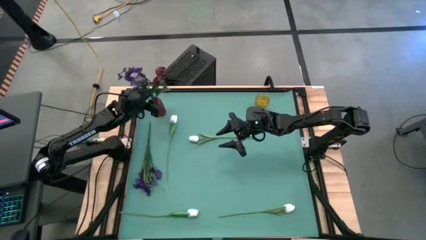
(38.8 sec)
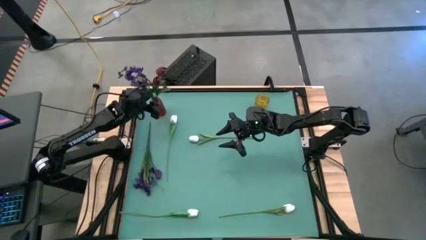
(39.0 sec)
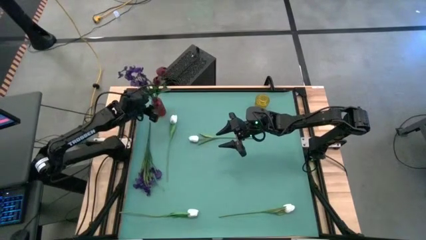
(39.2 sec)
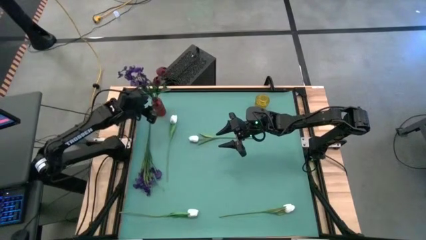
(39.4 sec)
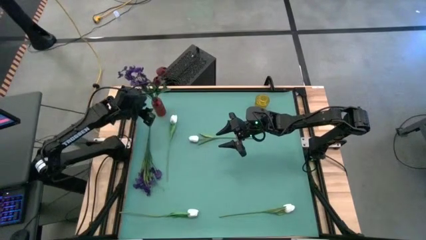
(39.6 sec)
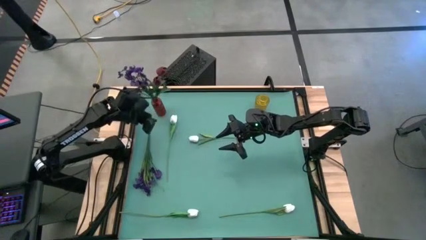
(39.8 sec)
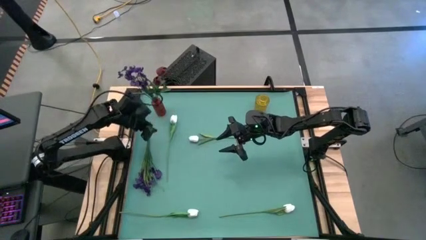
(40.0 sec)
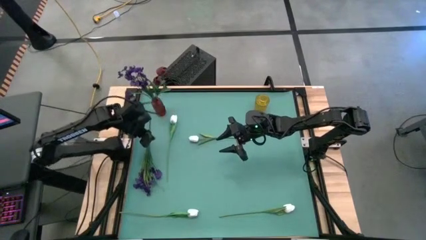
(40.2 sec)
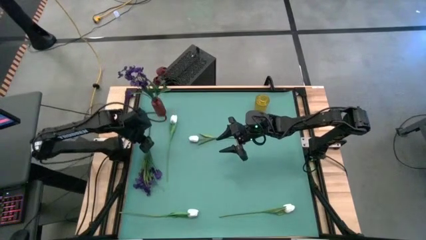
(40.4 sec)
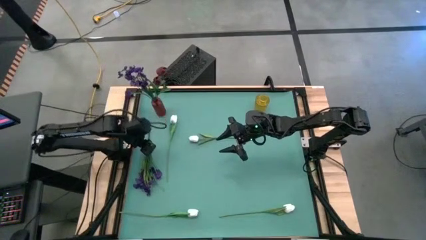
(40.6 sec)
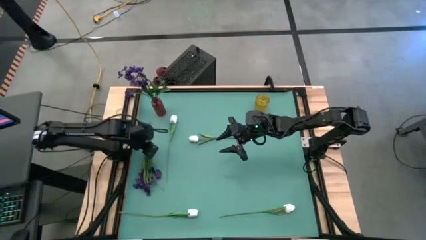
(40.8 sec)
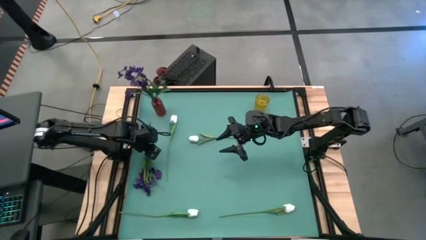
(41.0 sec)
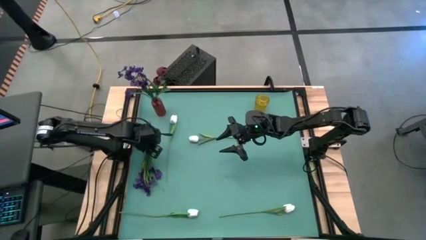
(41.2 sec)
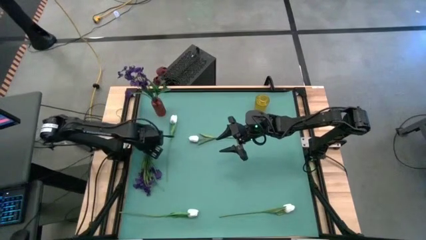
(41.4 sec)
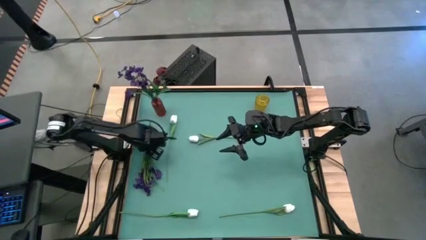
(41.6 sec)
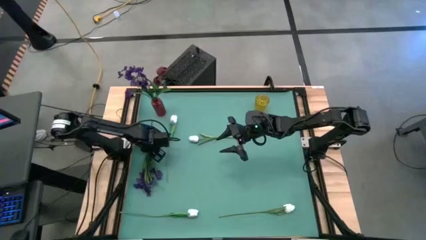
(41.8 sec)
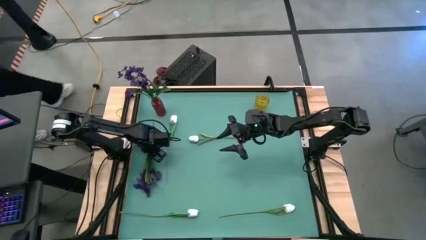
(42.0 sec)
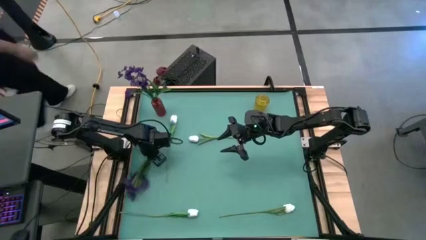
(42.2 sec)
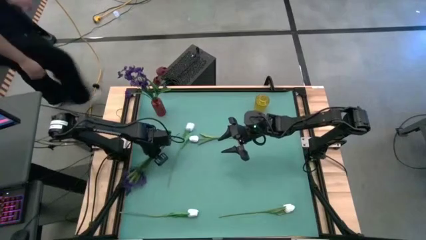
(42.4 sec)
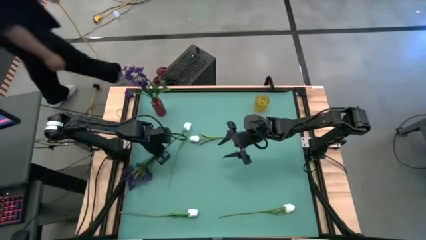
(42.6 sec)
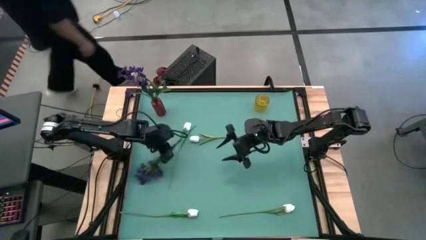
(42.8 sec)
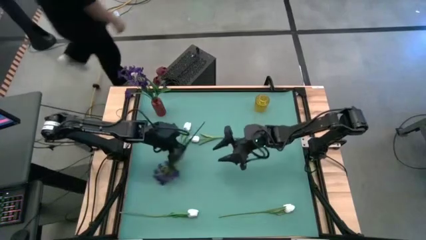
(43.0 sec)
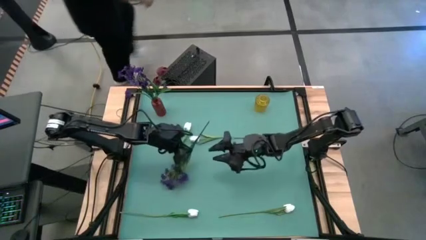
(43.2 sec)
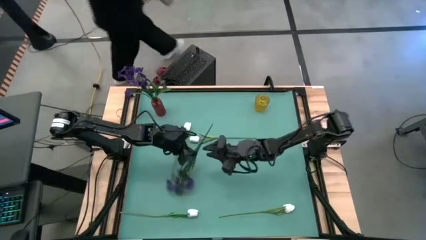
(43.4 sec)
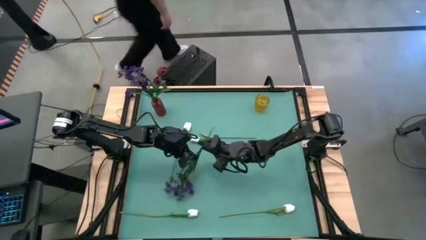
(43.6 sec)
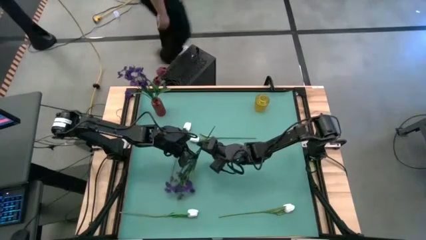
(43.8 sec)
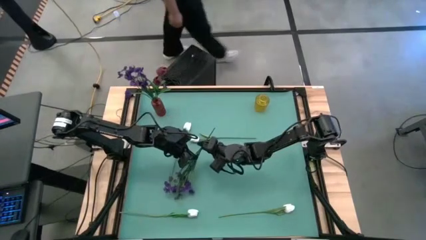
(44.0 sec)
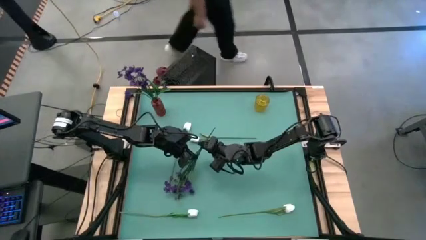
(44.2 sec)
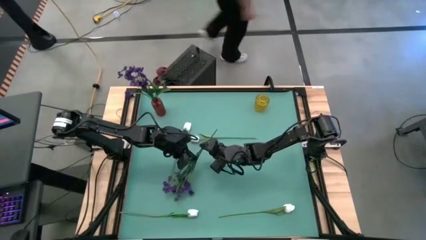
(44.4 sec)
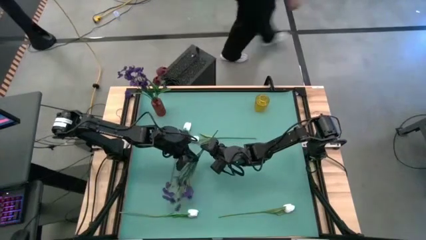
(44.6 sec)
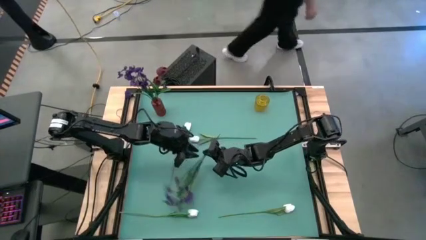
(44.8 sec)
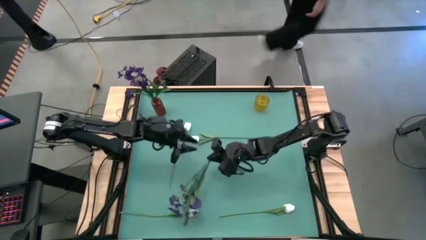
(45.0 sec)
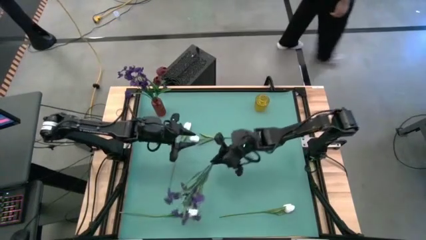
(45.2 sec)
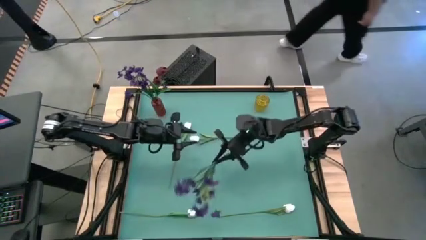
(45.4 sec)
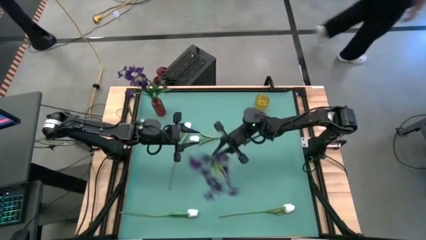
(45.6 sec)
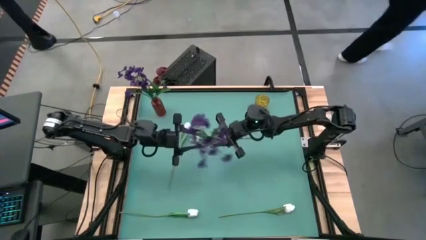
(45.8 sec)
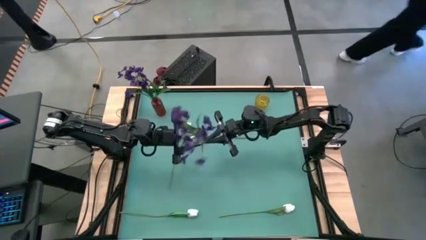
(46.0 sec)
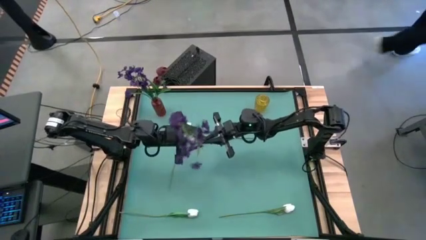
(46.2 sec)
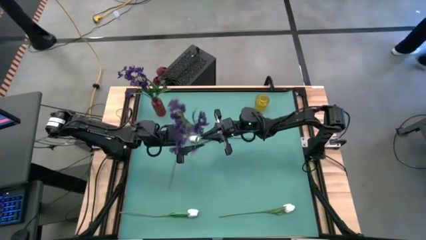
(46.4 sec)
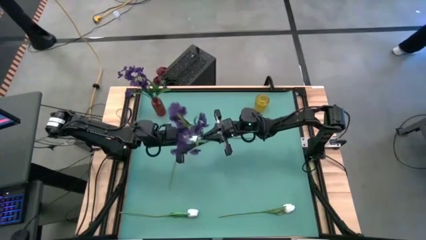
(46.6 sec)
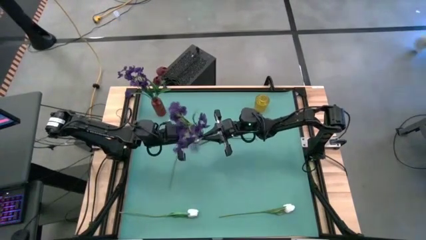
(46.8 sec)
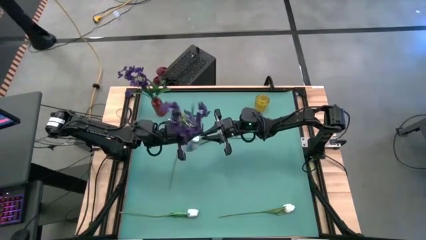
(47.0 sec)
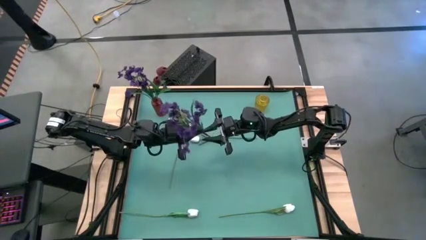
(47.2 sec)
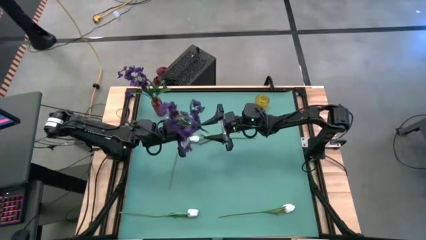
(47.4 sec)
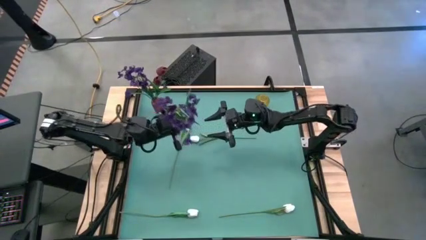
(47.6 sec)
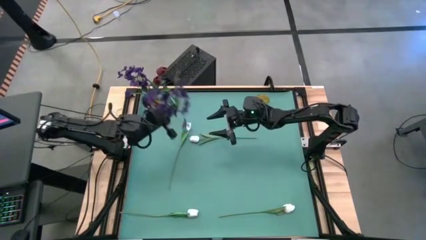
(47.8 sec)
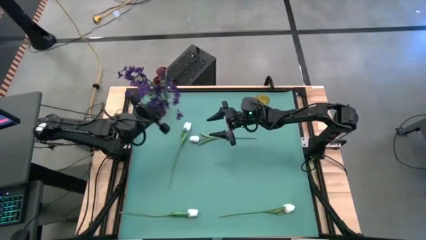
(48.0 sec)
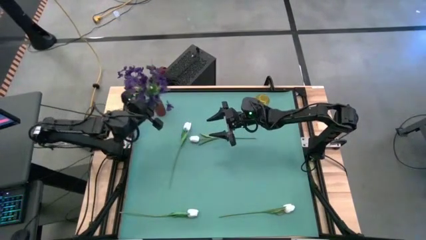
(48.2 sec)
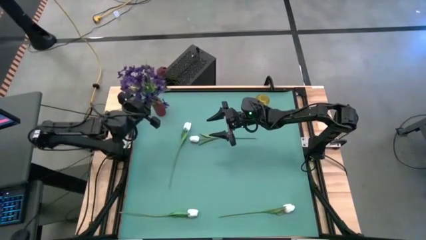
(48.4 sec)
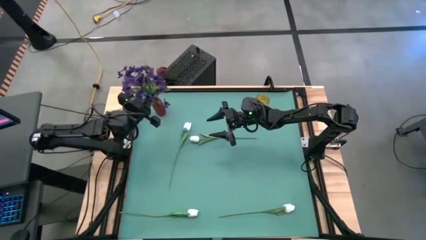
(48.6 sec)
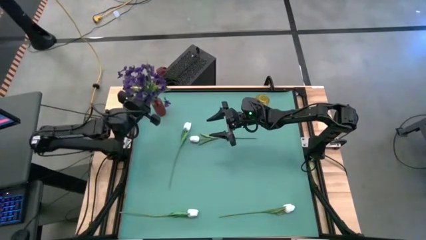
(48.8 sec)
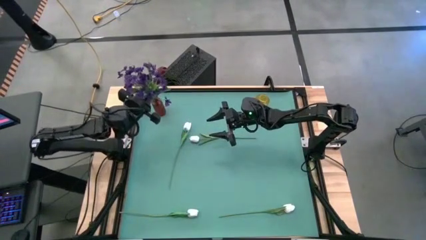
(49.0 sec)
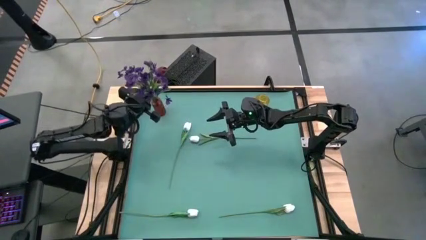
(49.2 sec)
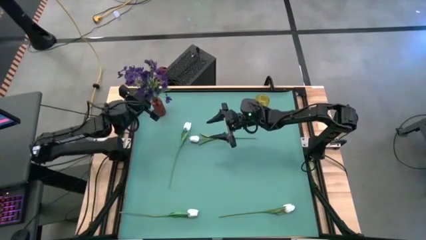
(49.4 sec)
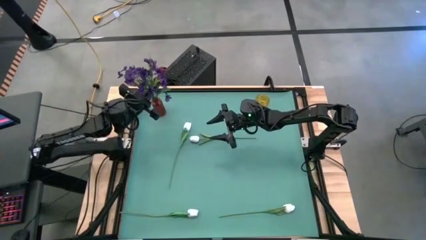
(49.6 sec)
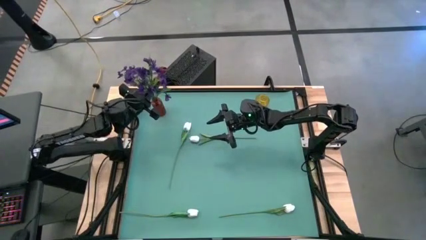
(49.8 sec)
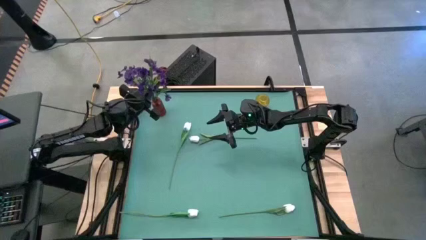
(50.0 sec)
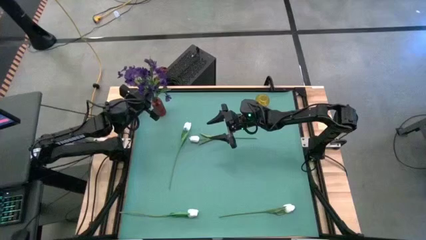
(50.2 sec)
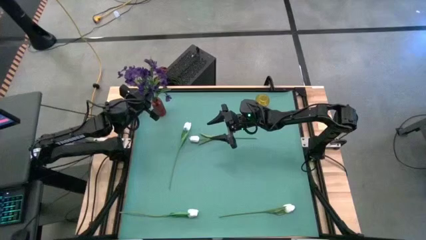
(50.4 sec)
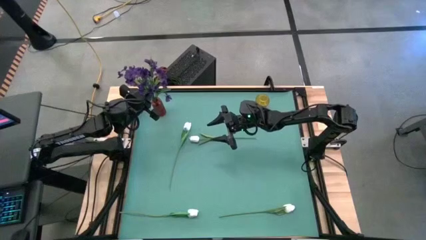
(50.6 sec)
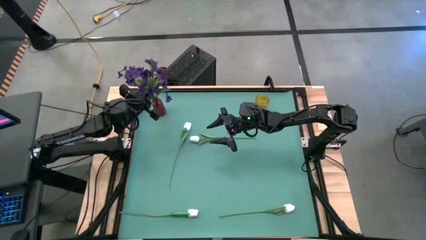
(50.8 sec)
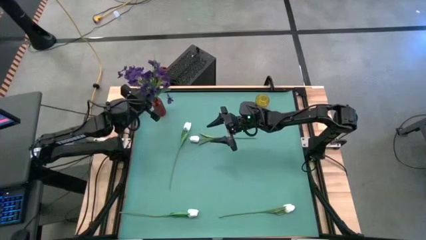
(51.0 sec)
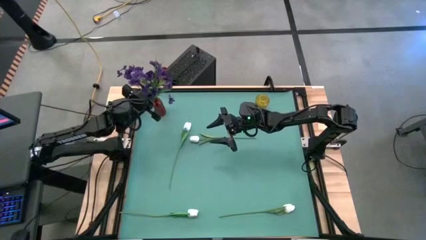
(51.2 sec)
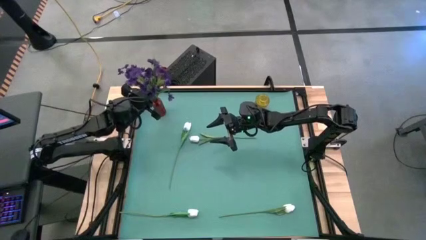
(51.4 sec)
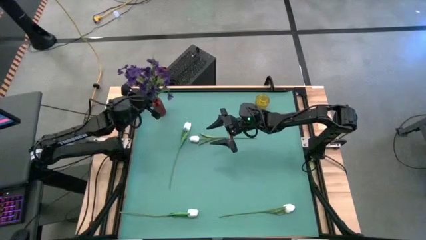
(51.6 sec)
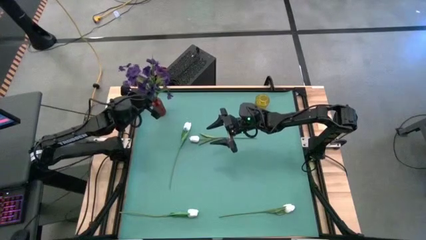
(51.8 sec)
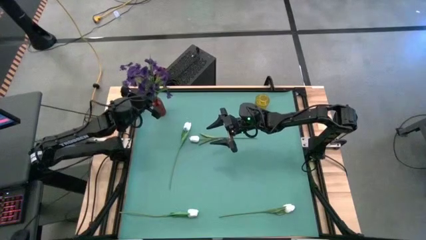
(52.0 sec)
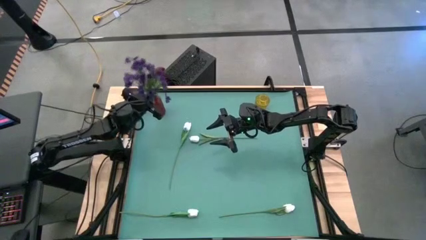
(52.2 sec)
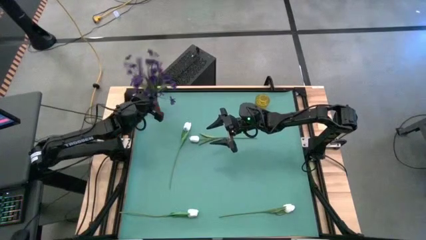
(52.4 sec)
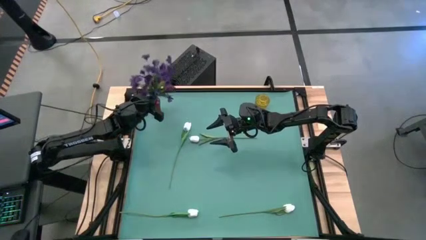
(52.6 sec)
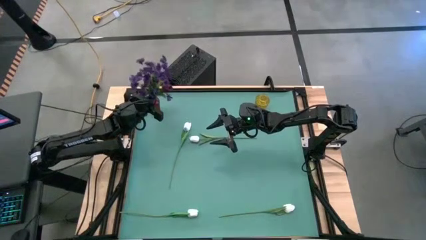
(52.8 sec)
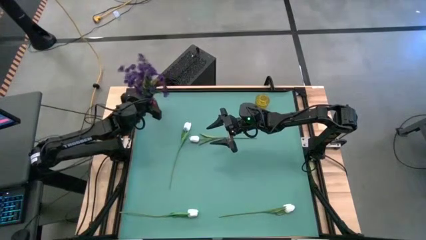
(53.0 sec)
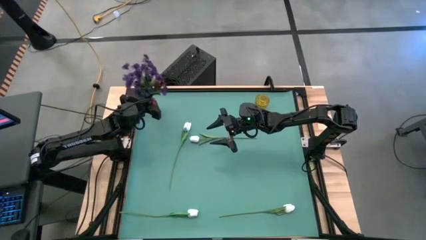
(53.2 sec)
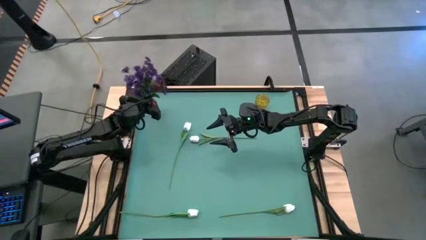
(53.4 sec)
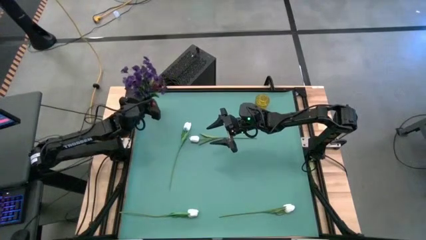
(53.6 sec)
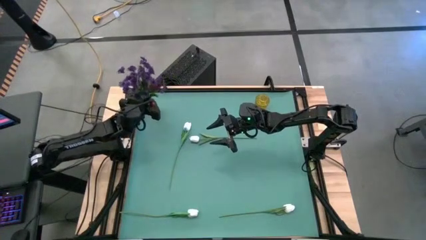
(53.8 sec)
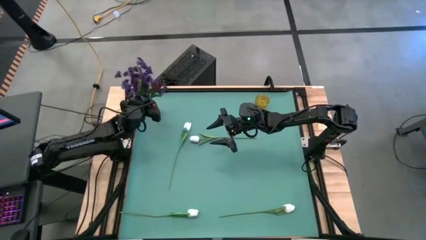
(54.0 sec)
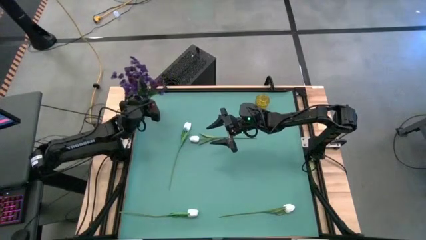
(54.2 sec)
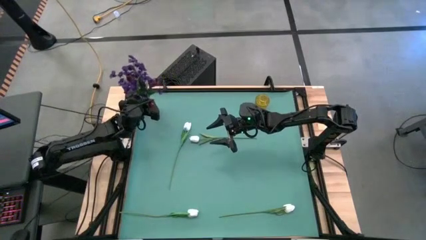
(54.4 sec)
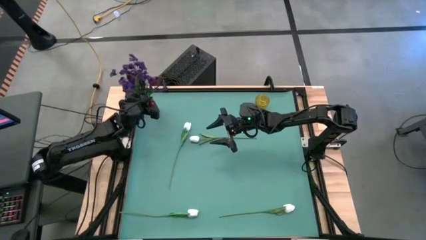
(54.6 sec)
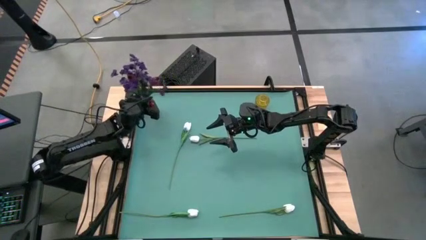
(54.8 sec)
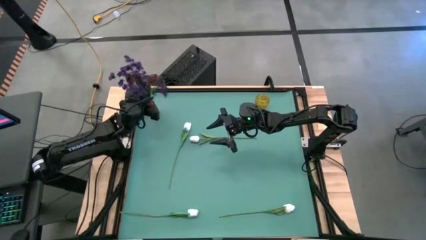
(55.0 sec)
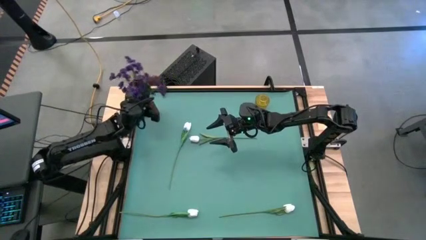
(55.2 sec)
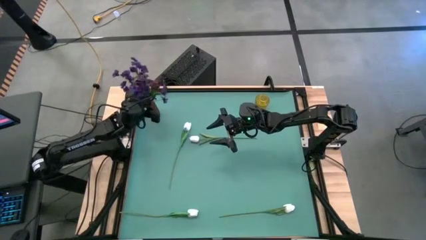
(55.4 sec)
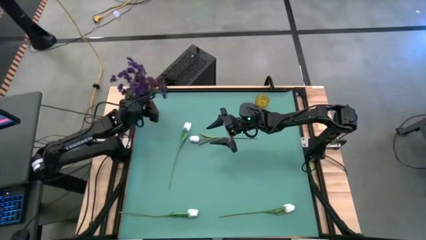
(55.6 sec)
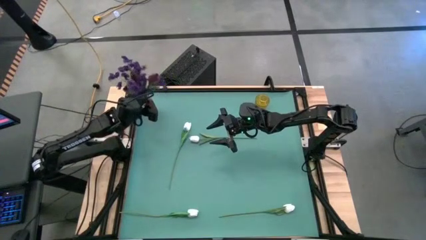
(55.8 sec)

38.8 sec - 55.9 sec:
Task: Sort flowers into vase by color
Put the violet flowers into the red vase
